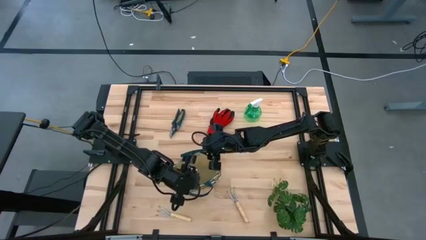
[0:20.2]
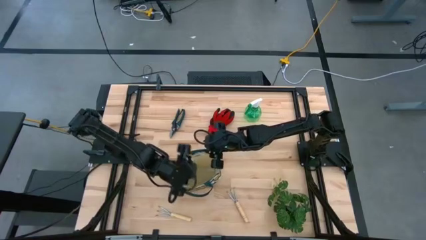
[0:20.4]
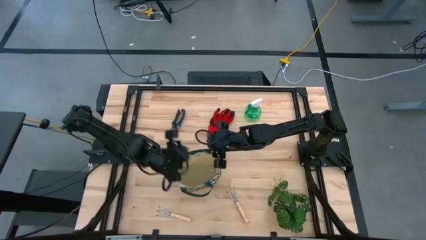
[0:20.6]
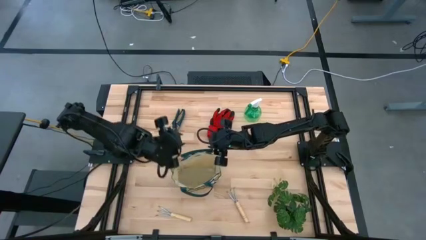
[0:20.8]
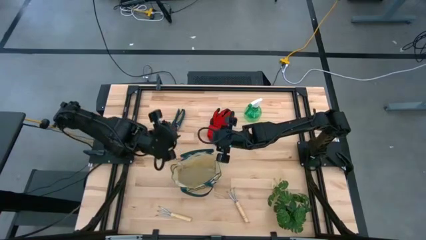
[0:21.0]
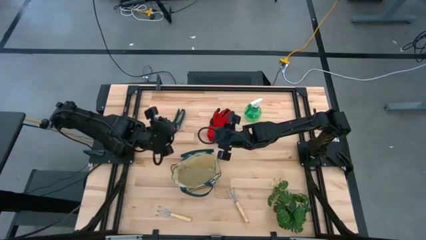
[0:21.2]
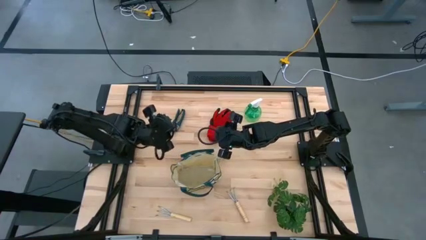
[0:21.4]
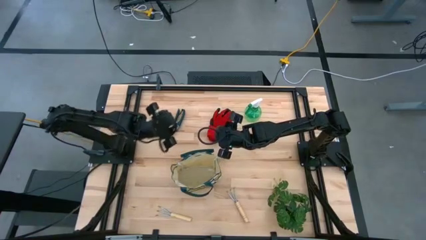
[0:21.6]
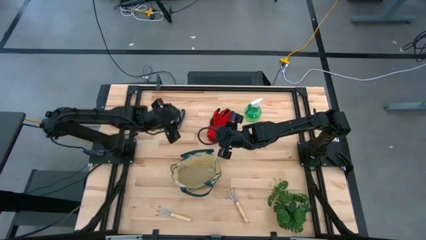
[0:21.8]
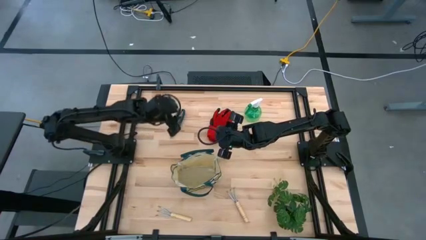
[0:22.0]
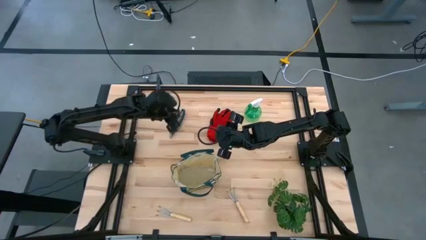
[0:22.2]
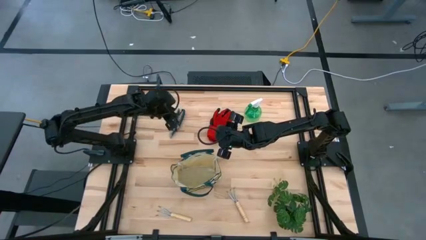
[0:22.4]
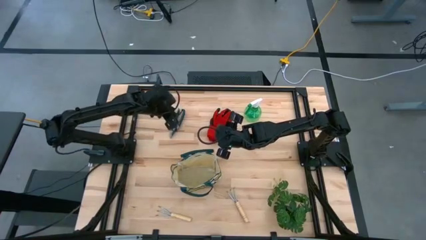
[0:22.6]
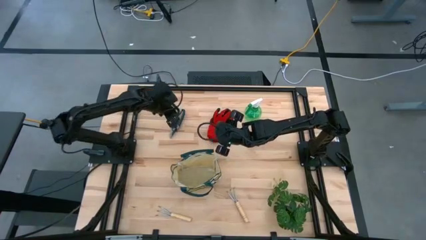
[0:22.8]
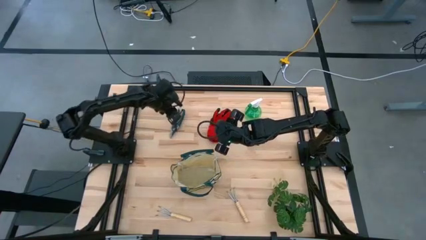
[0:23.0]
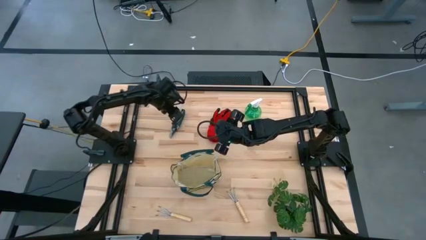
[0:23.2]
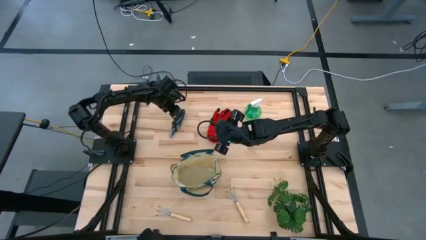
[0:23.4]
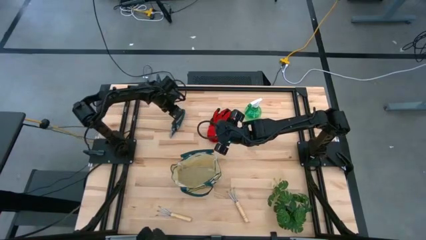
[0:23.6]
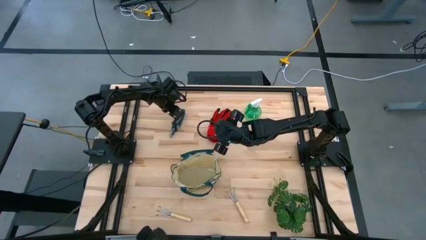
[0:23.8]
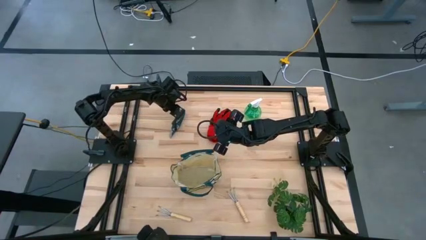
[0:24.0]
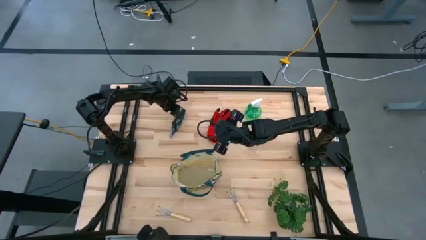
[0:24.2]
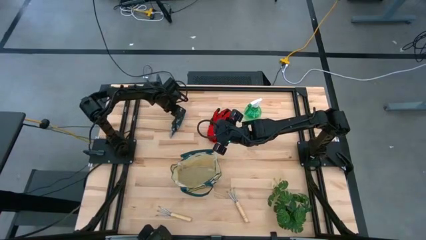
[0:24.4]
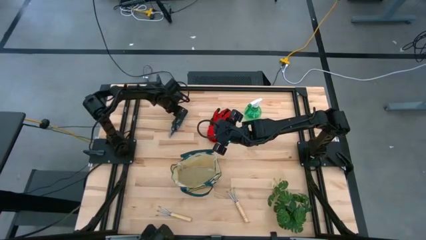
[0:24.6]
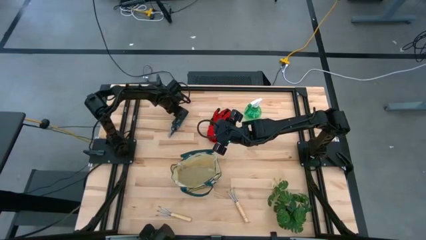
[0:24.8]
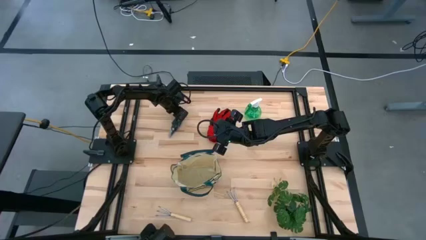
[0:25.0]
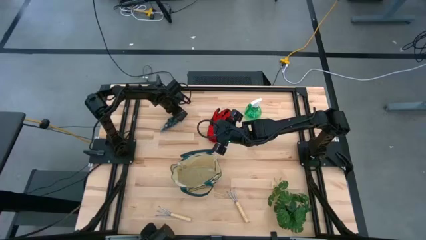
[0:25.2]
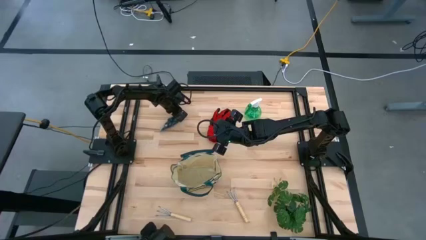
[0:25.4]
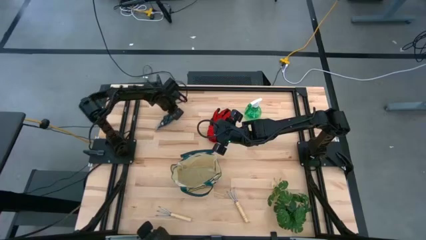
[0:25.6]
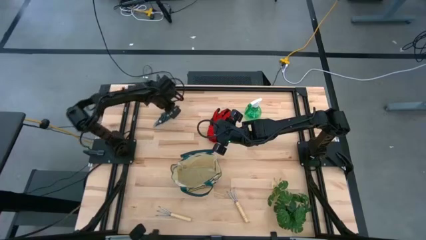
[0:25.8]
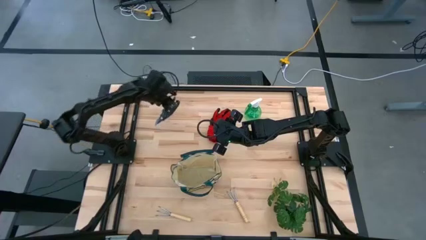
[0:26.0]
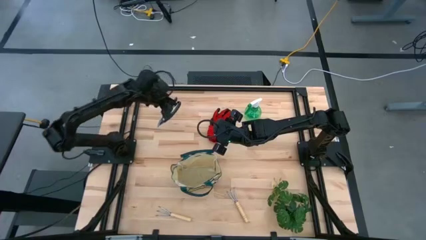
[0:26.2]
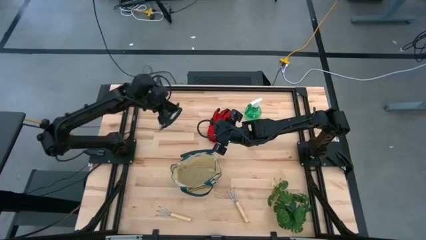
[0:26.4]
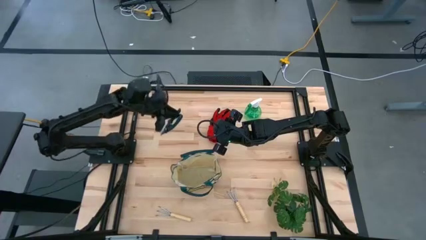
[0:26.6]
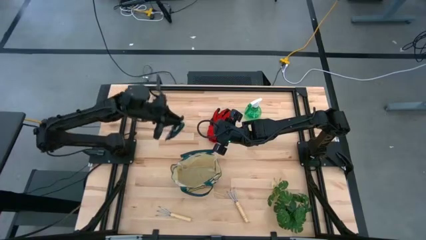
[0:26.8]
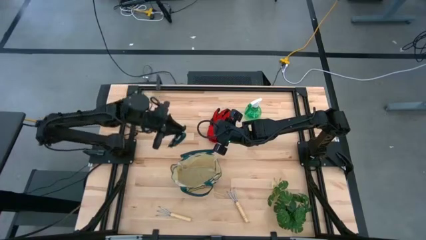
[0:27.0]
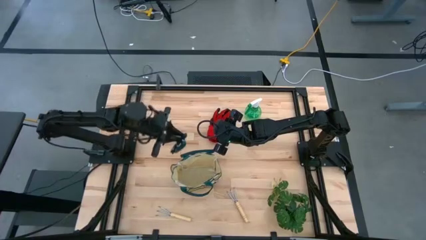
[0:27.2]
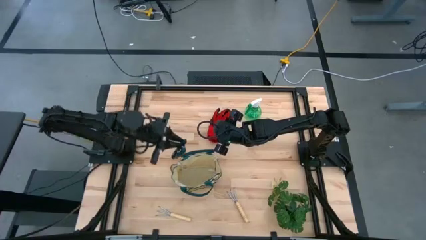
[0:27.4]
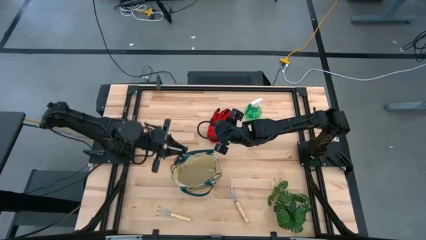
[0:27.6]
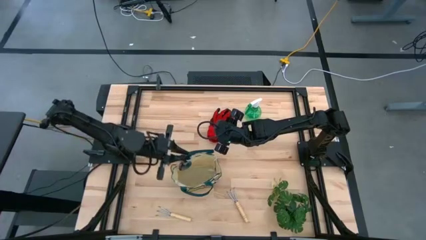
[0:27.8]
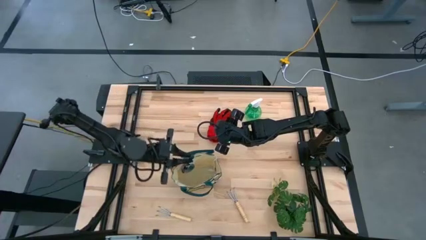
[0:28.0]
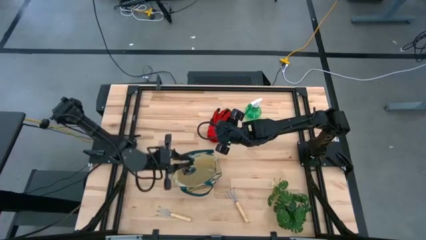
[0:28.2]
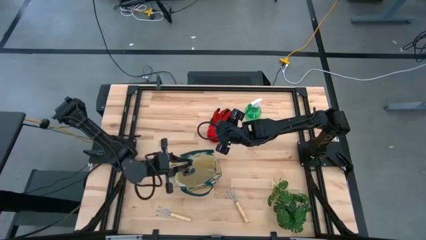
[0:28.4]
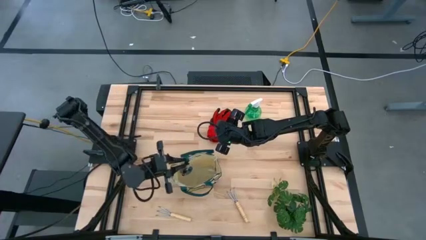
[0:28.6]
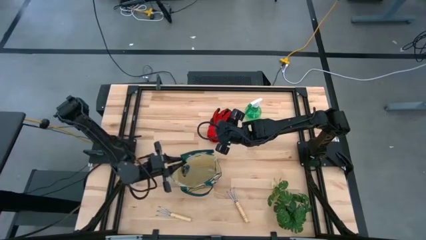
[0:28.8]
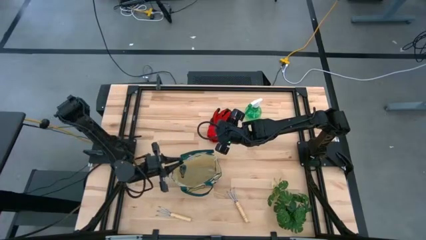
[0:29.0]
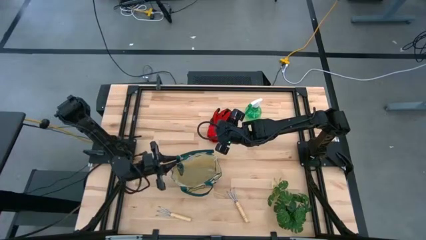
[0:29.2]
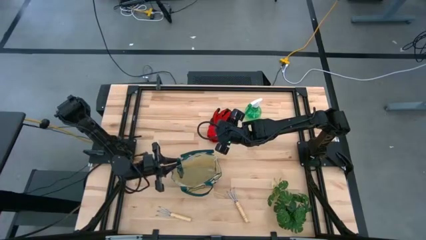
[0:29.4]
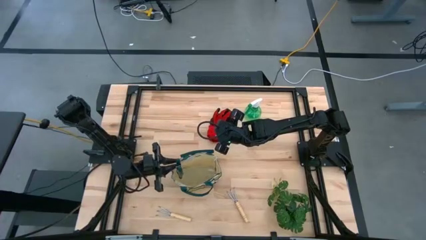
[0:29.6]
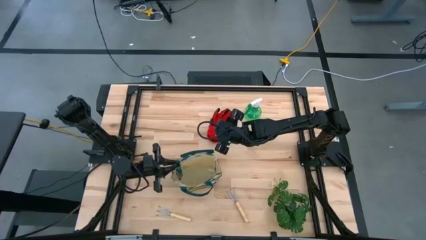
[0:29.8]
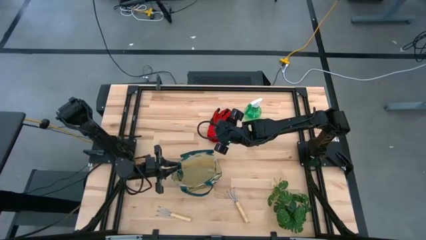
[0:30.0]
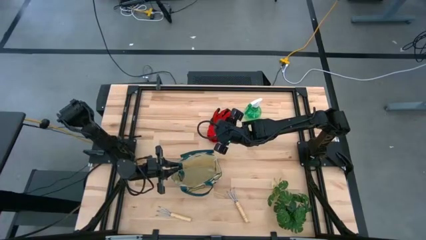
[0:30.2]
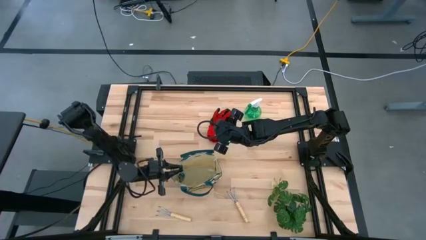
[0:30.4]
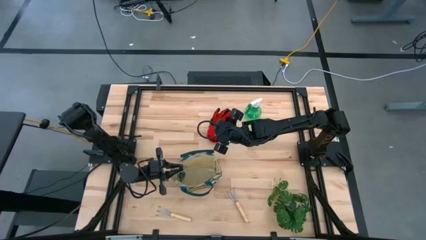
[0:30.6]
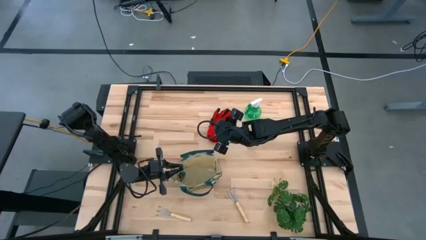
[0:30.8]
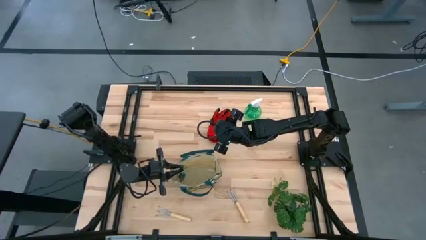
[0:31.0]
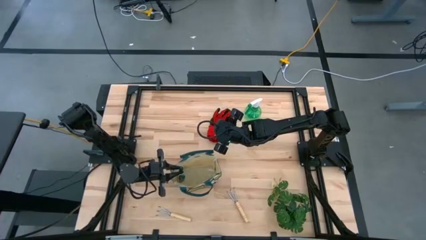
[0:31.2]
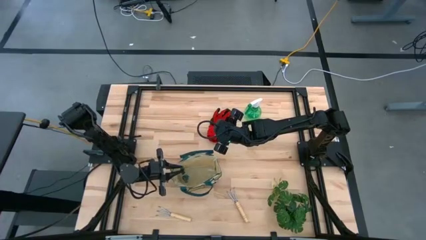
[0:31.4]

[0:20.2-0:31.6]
Task: Pick & Place Garden tools in Gardening bag
Put the shear scissors into the gardening bag
